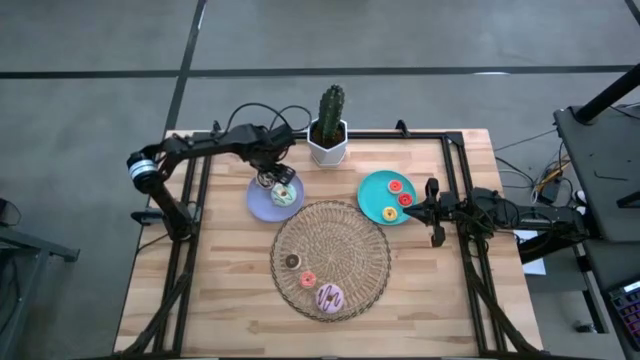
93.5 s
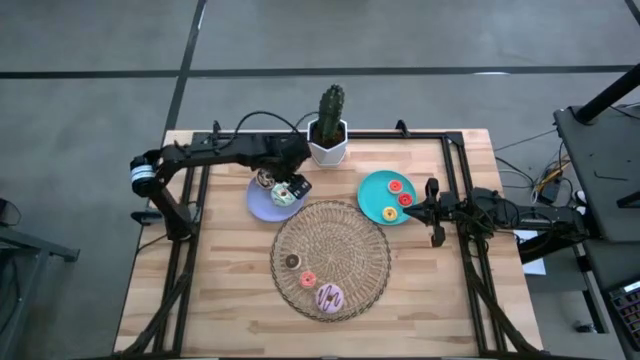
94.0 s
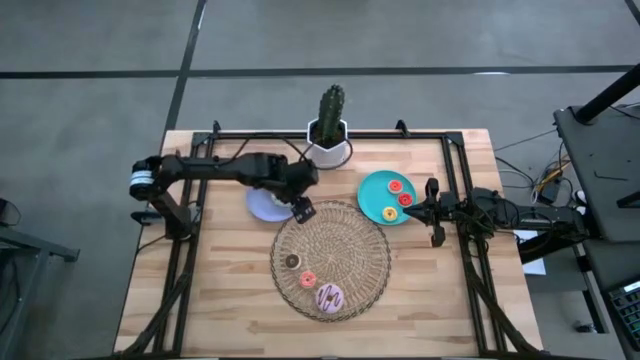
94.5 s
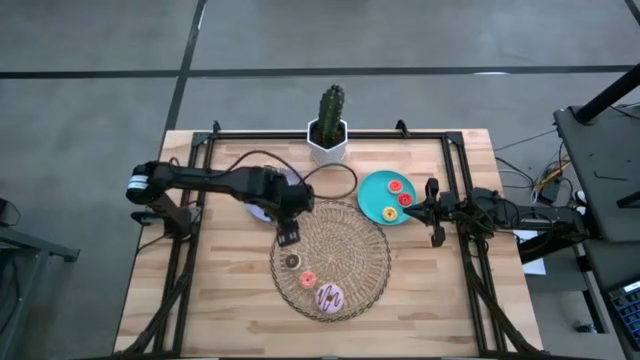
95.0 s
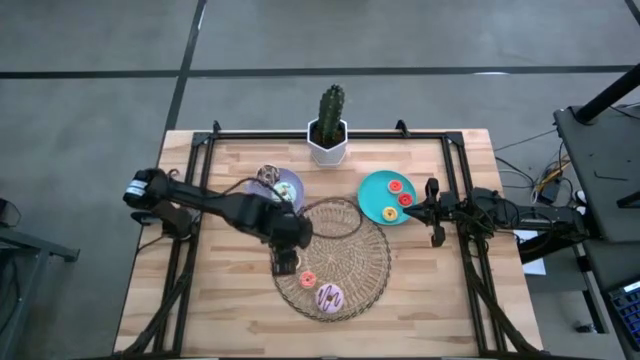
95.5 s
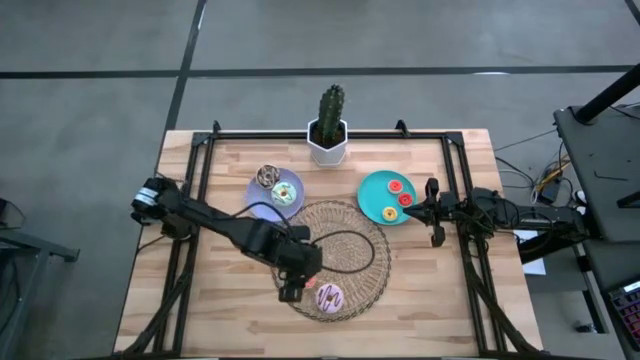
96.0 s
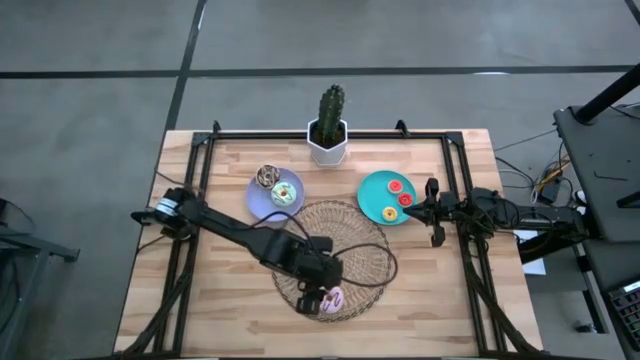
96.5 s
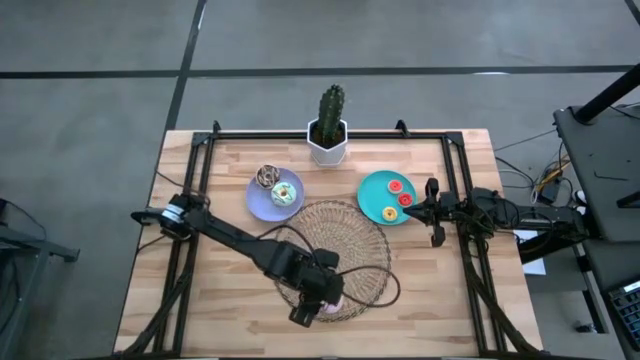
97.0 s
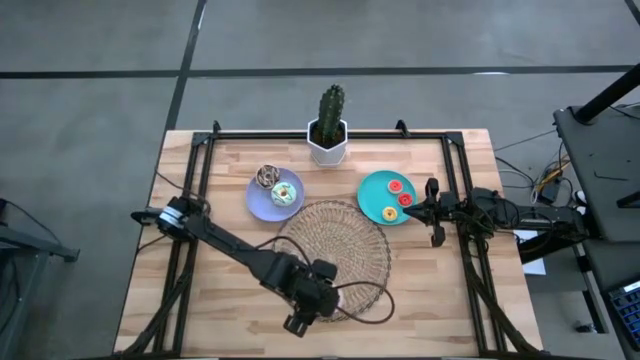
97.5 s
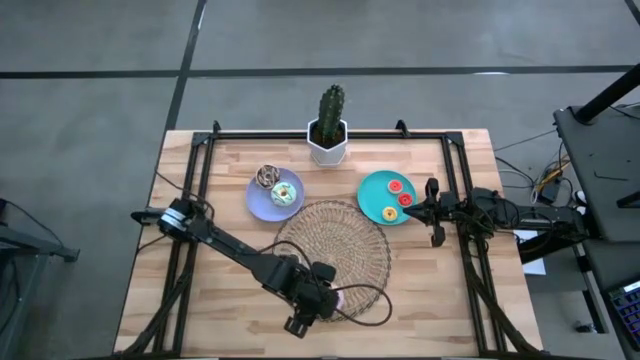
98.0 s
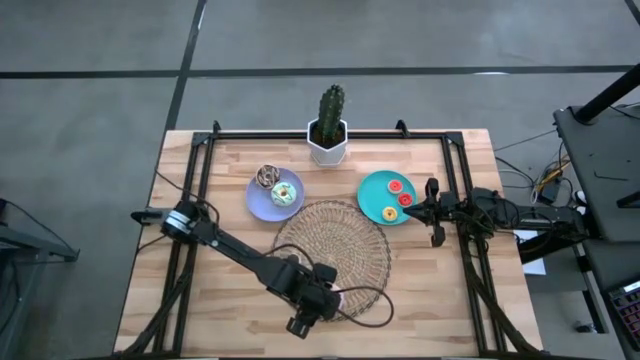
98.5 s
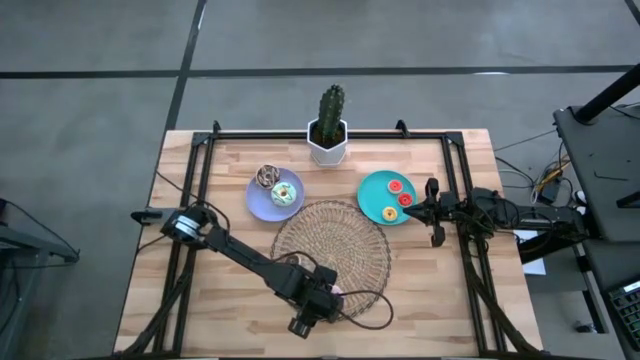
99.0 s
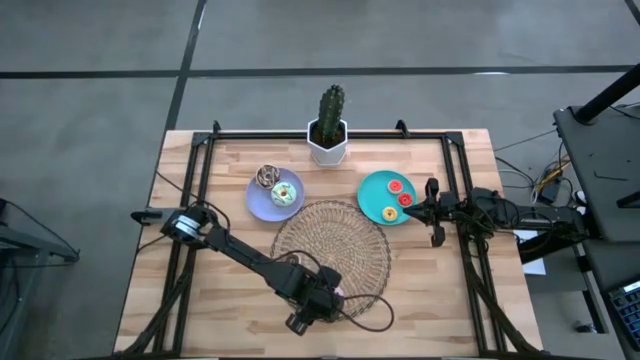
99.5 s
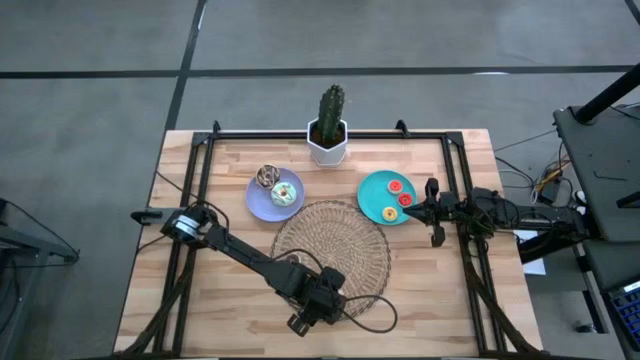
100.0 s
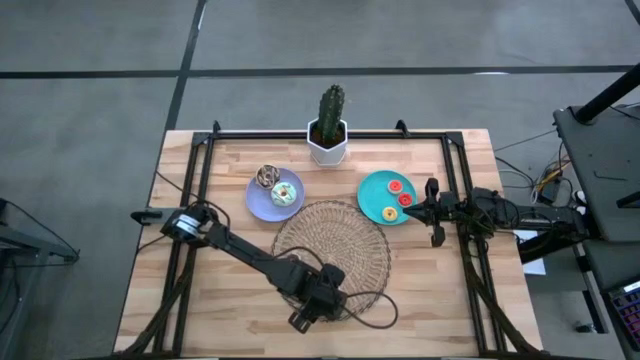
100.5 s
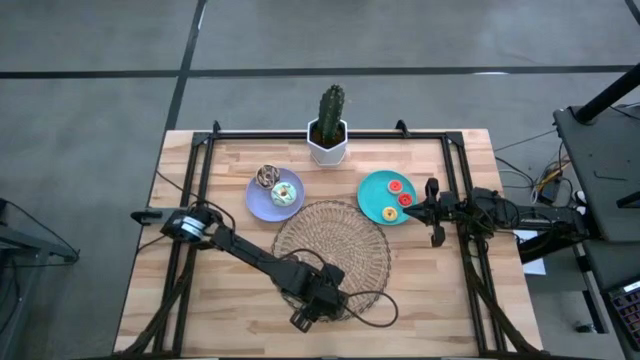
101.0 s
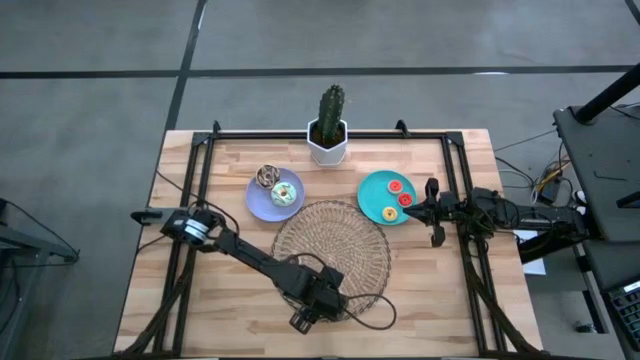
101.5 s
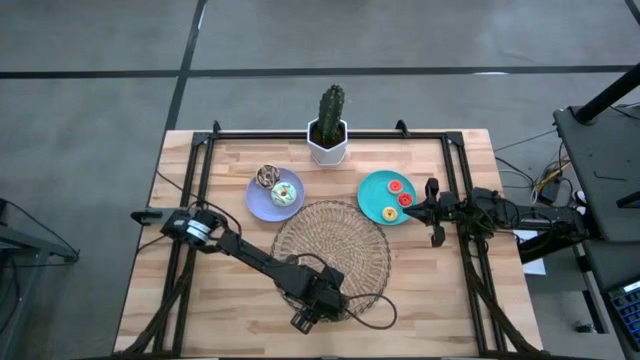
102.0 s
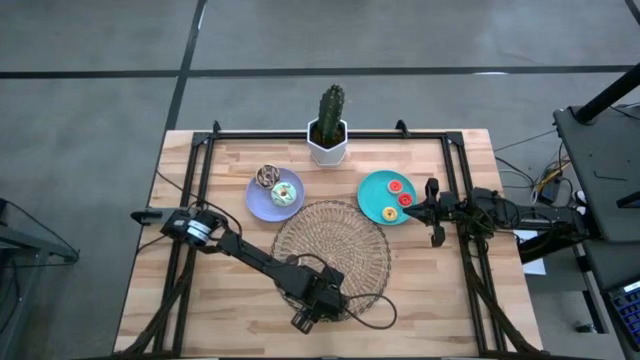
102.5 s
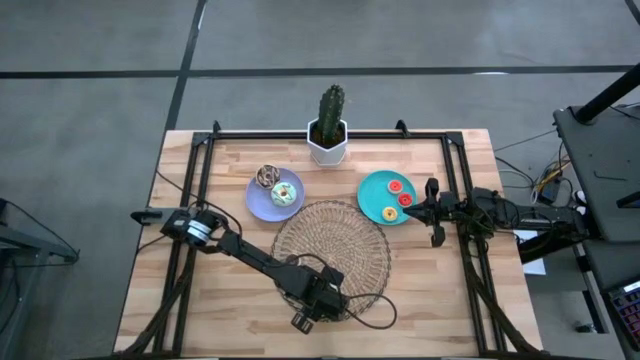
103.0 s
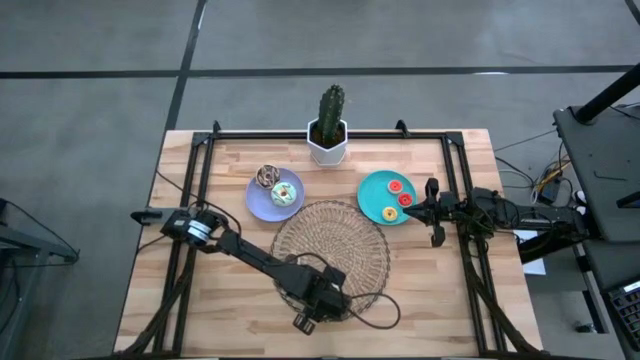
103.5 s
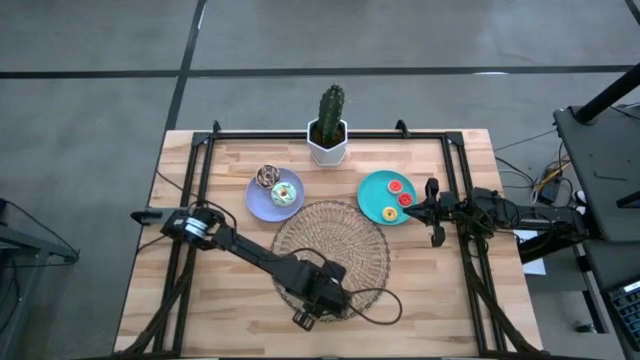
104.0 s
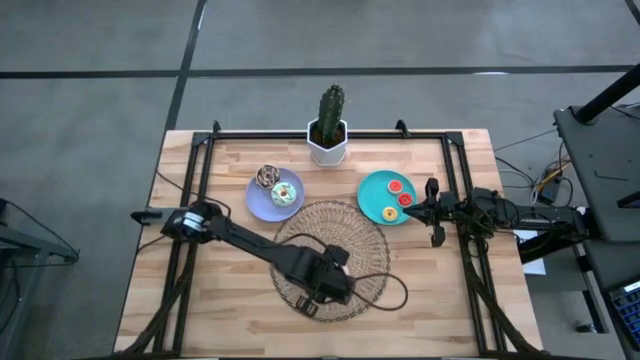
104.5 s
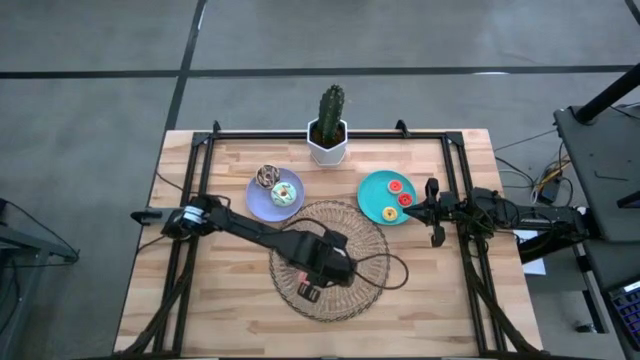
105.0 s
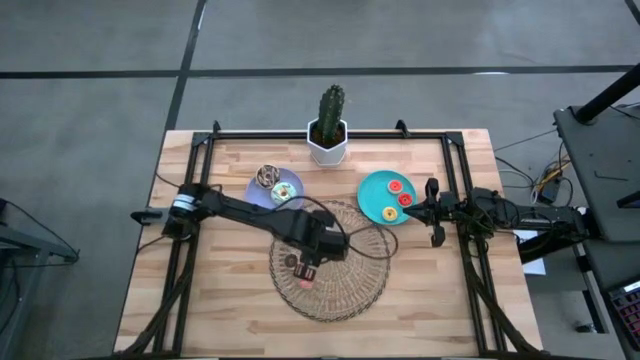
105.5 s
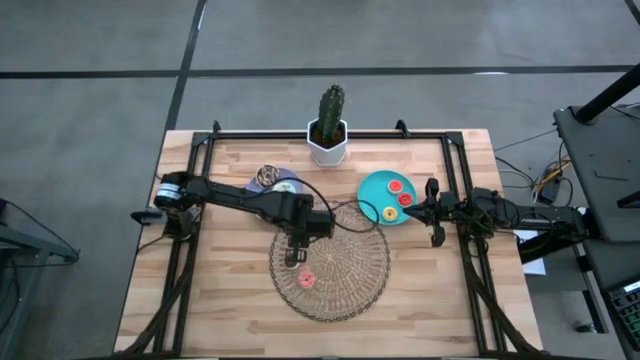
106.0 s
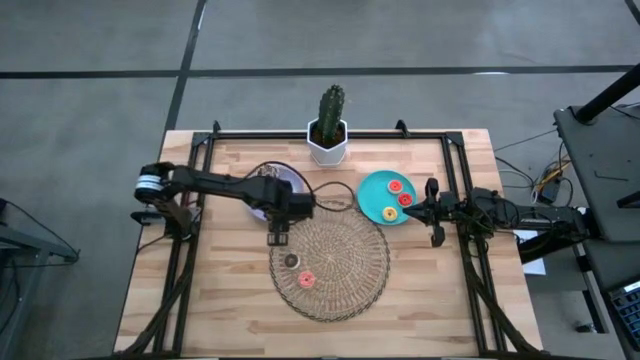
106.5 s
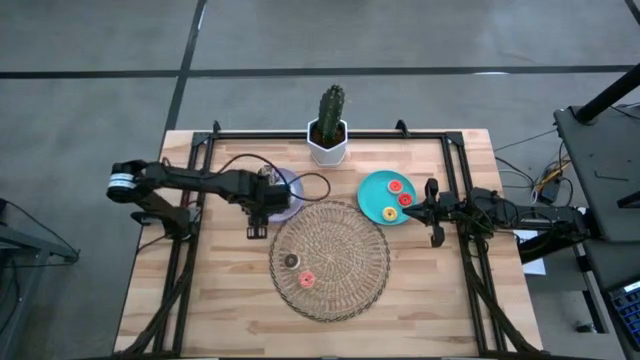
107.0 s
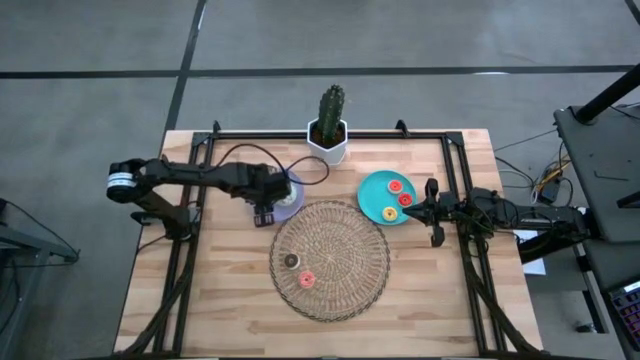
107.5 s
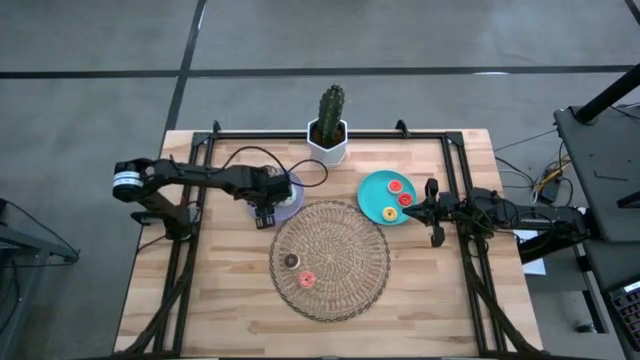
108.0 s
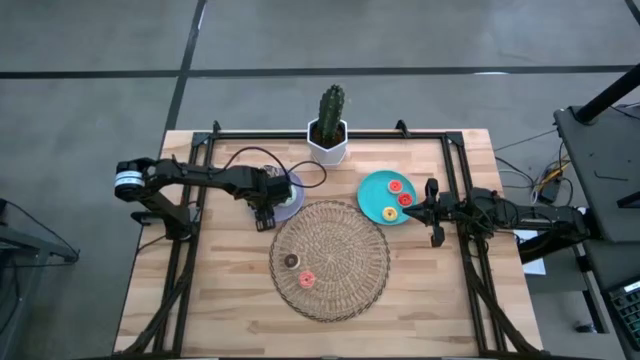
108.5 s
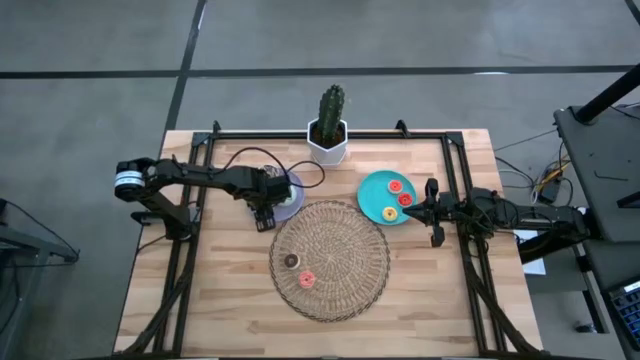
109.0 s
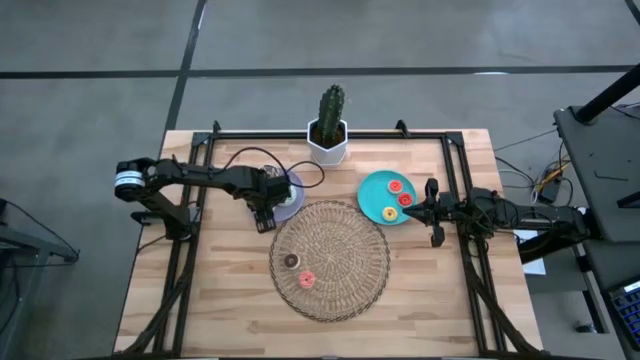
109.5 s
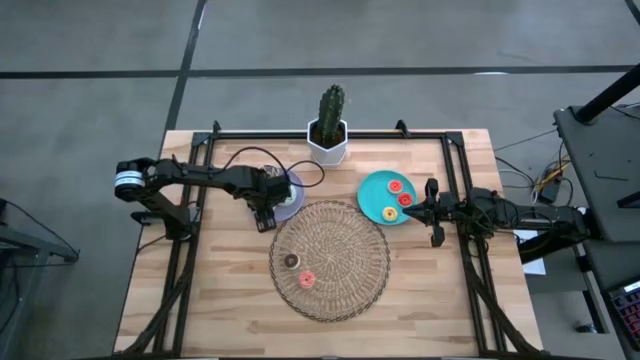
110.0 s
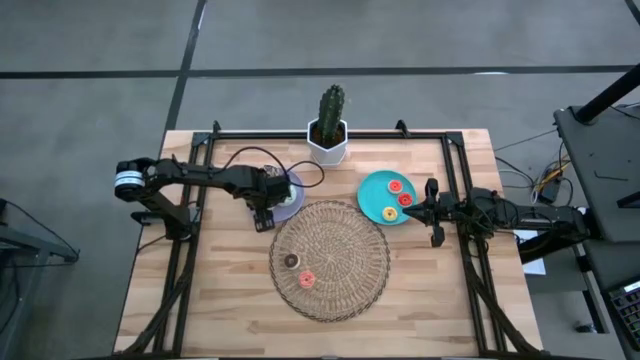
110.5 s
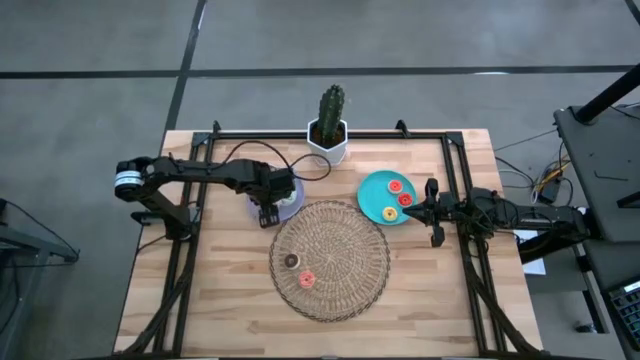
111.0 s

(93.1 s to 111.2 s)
Task: Pick & Place donuts
Put the large purple donut on the purple plate
